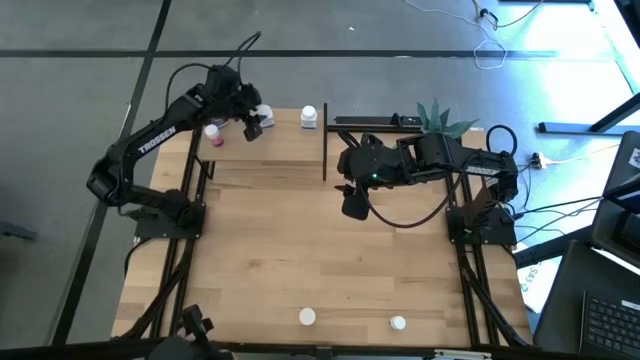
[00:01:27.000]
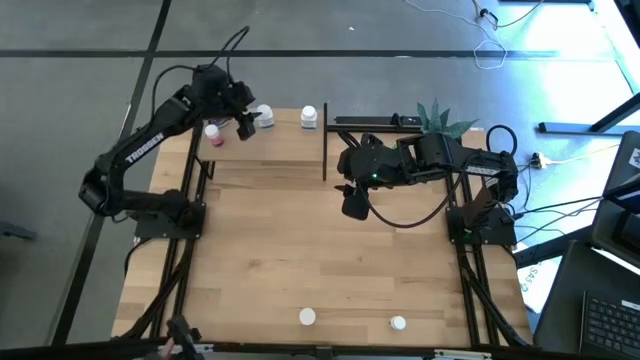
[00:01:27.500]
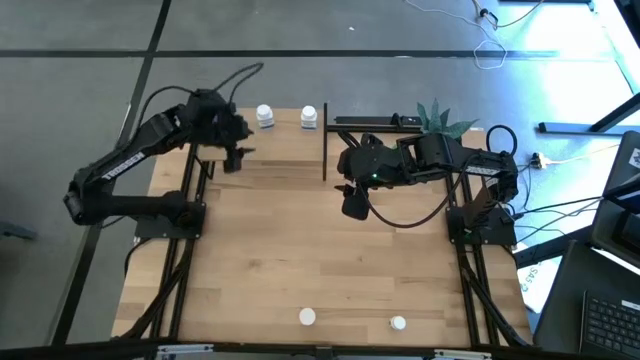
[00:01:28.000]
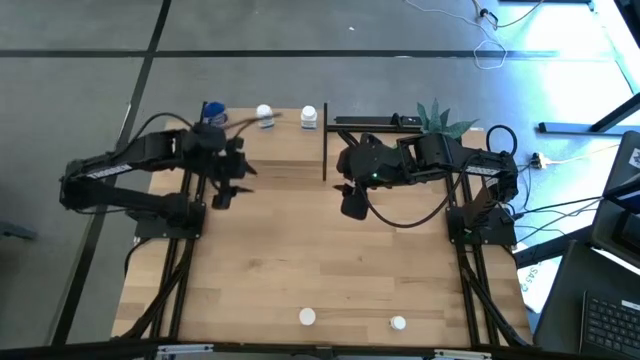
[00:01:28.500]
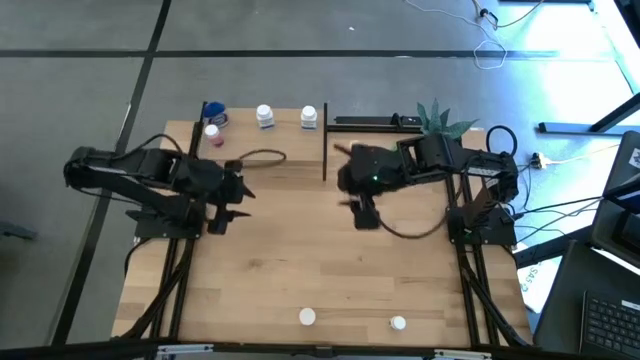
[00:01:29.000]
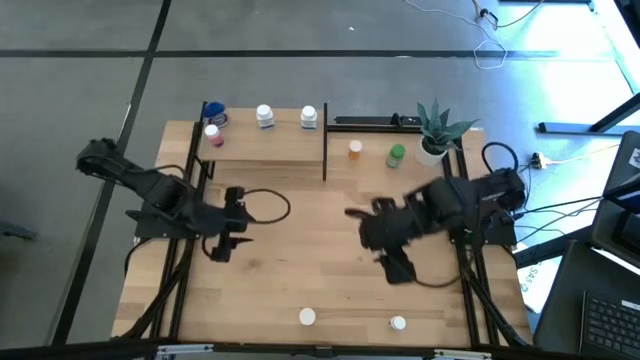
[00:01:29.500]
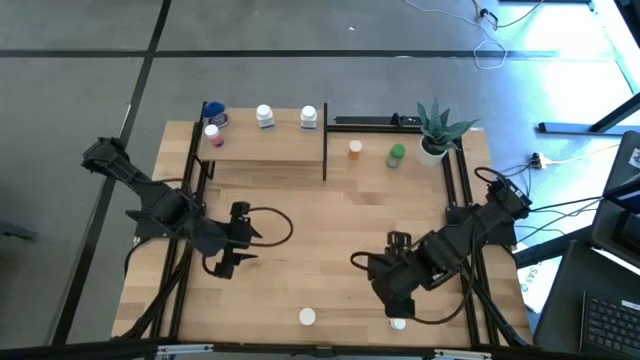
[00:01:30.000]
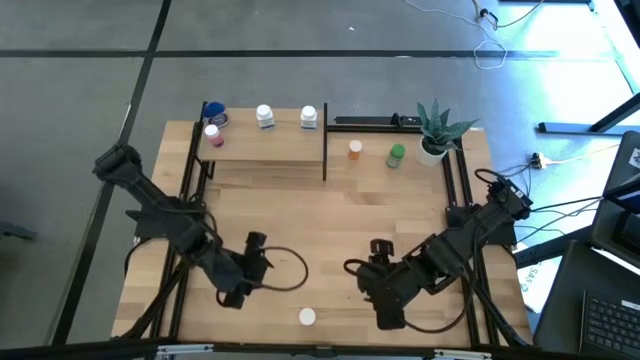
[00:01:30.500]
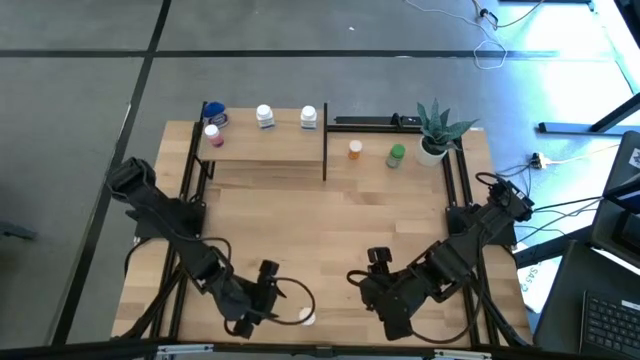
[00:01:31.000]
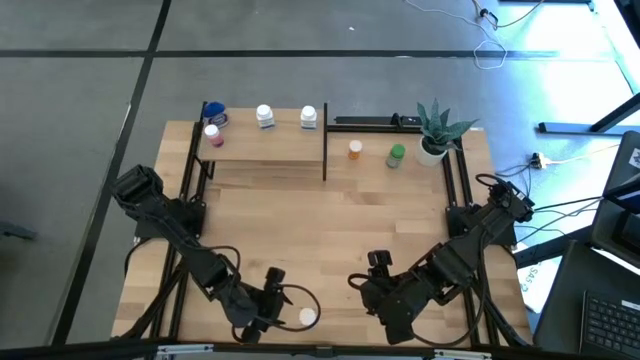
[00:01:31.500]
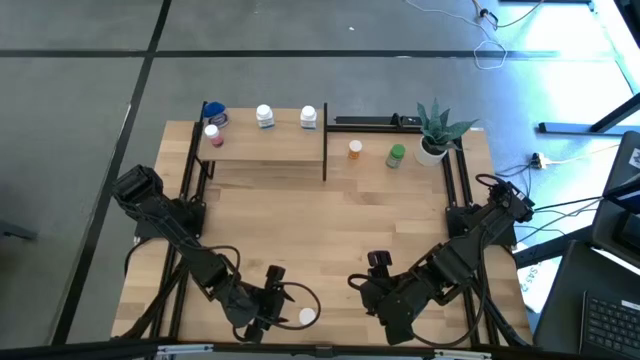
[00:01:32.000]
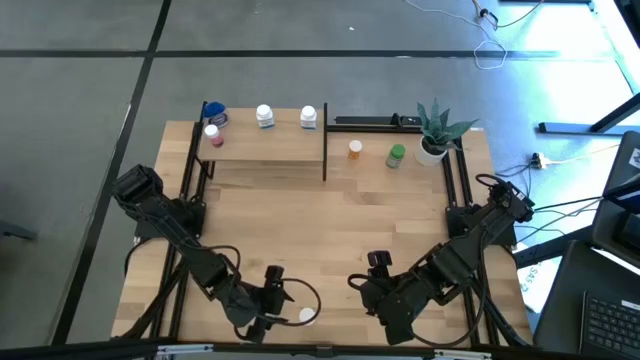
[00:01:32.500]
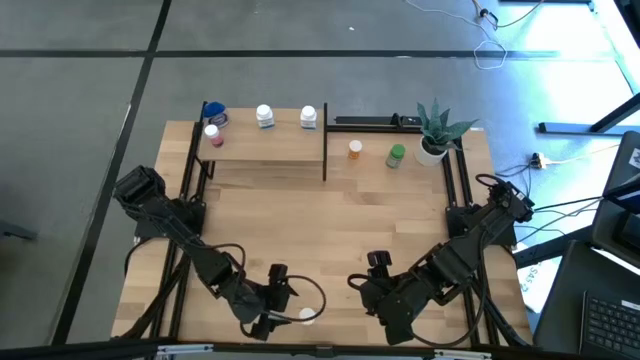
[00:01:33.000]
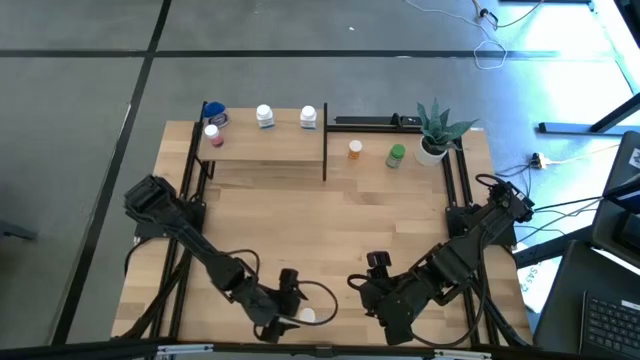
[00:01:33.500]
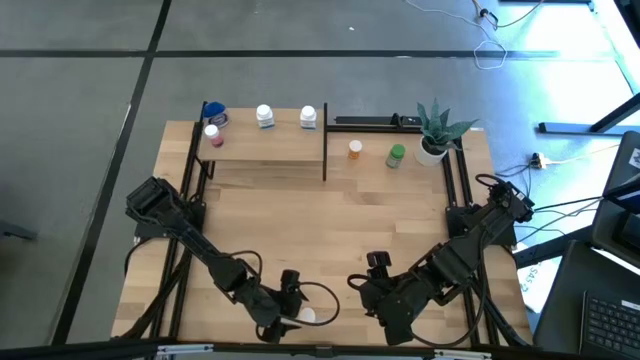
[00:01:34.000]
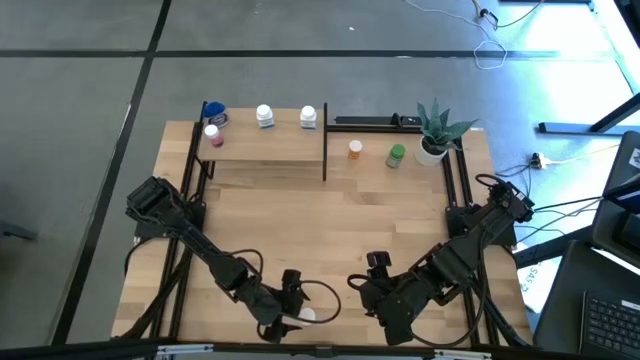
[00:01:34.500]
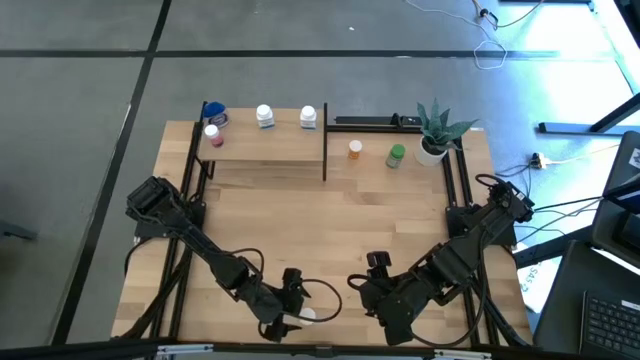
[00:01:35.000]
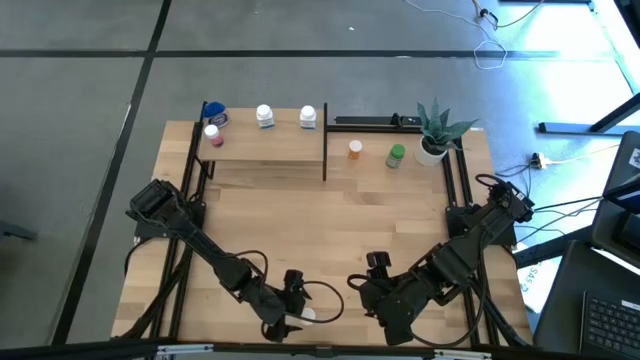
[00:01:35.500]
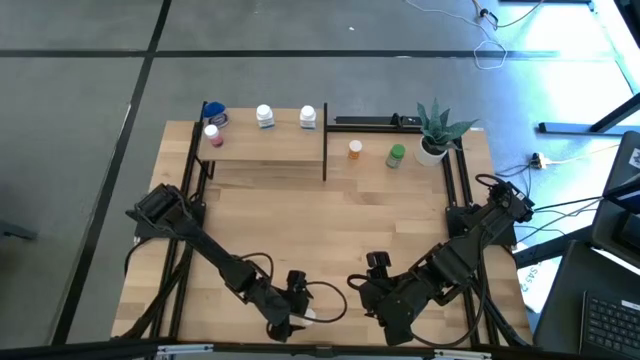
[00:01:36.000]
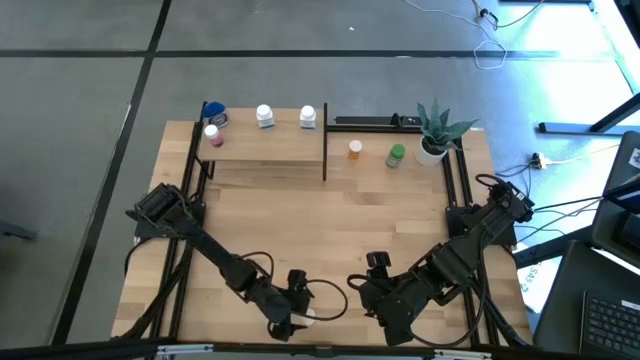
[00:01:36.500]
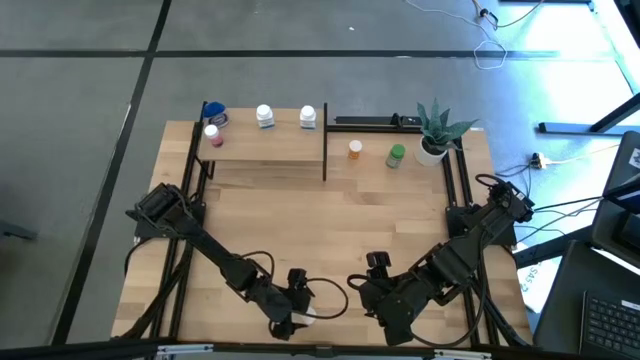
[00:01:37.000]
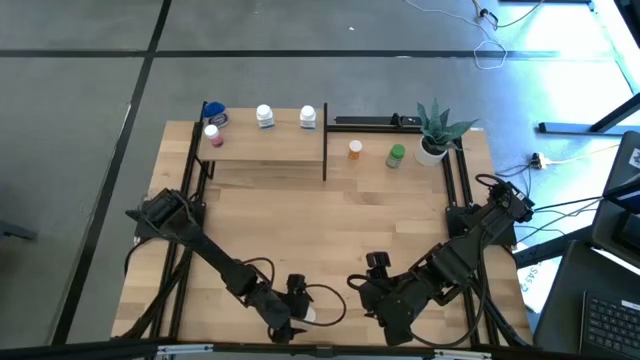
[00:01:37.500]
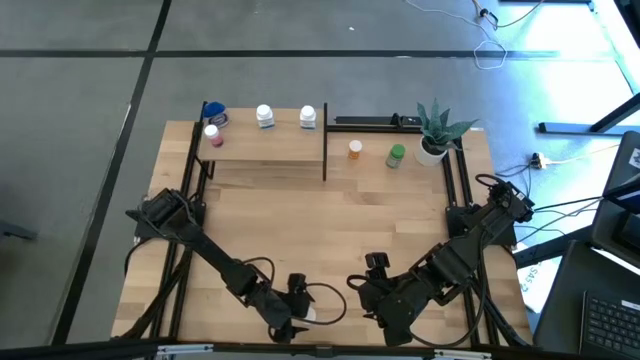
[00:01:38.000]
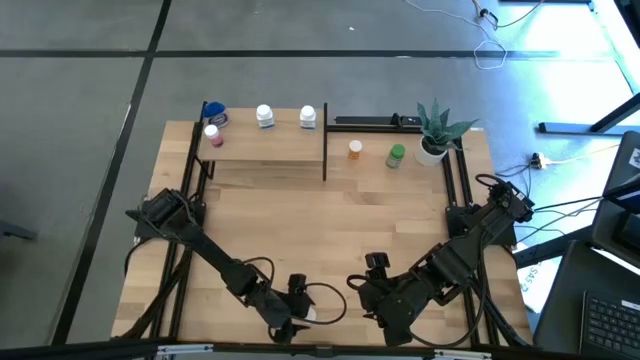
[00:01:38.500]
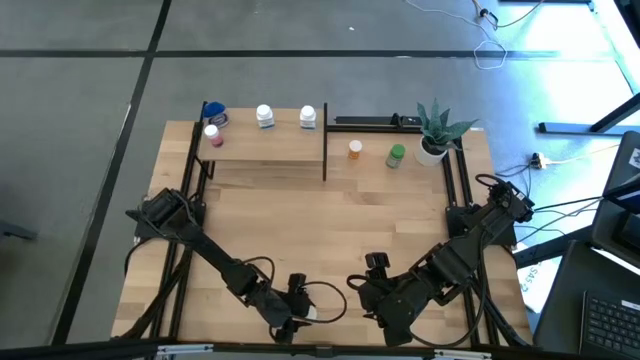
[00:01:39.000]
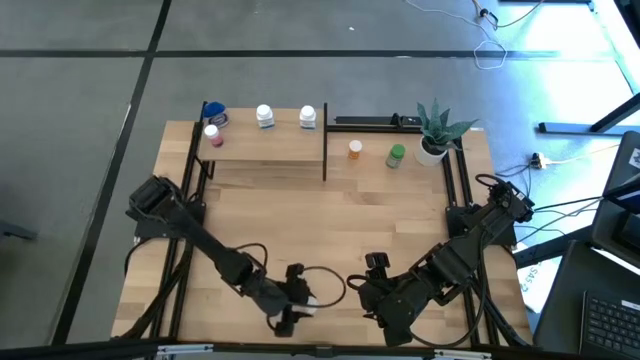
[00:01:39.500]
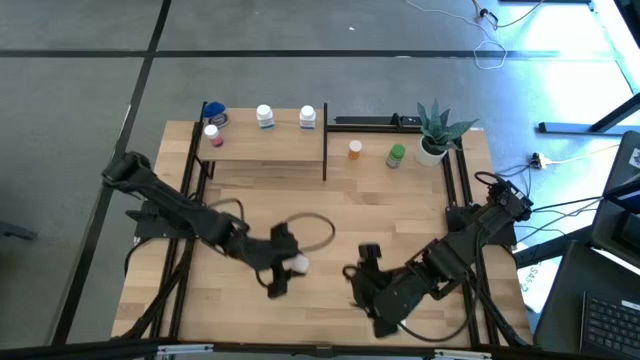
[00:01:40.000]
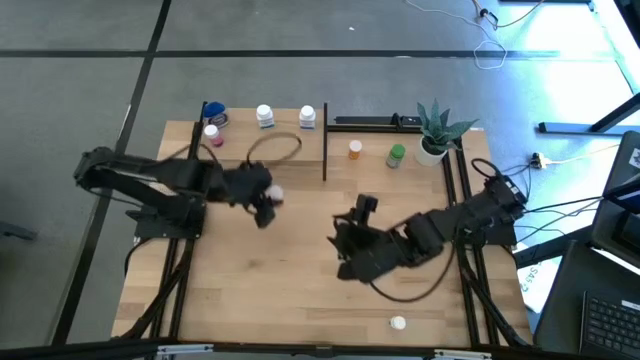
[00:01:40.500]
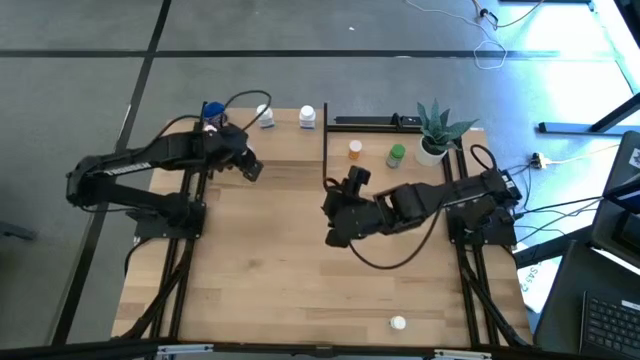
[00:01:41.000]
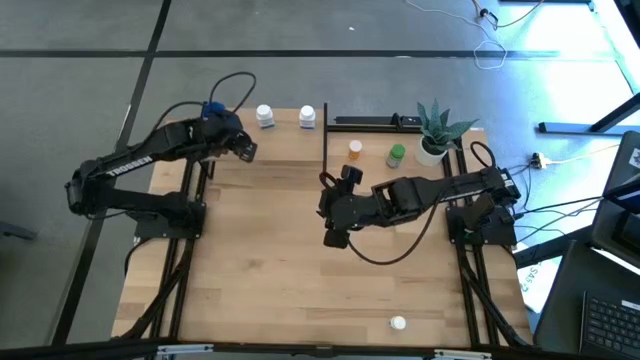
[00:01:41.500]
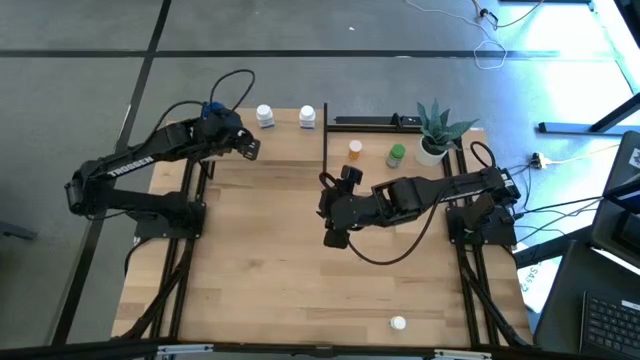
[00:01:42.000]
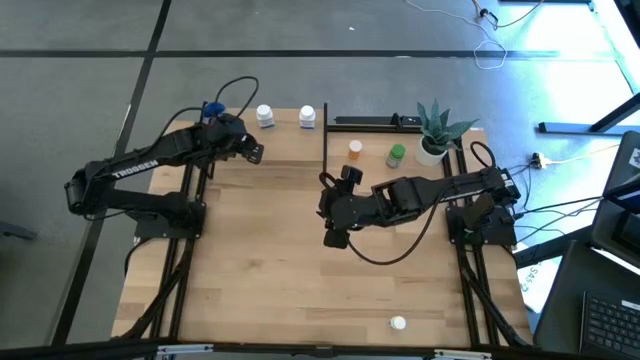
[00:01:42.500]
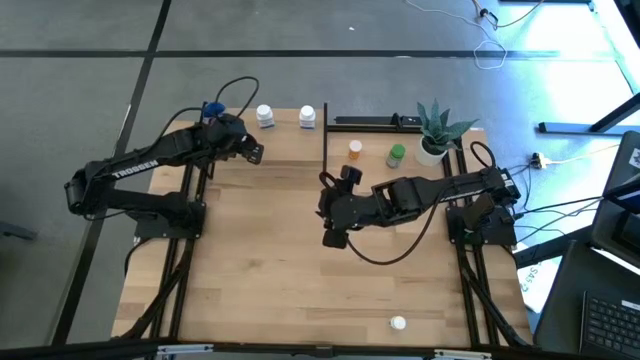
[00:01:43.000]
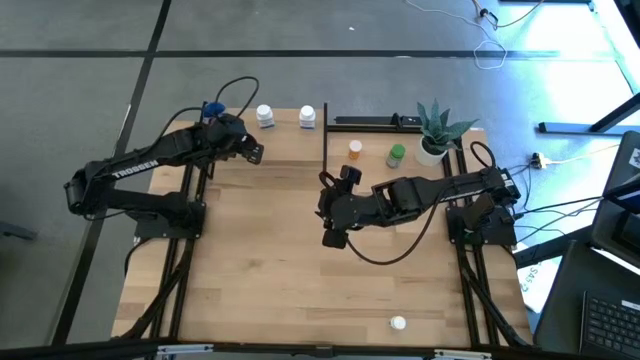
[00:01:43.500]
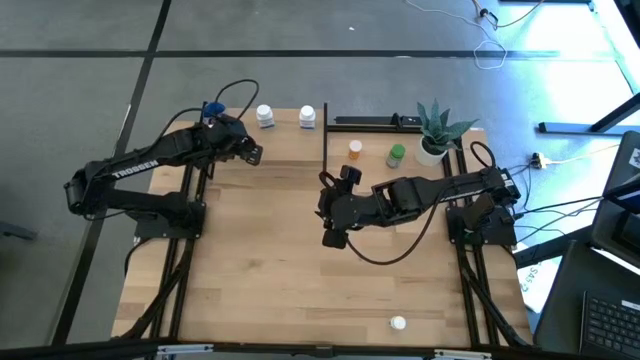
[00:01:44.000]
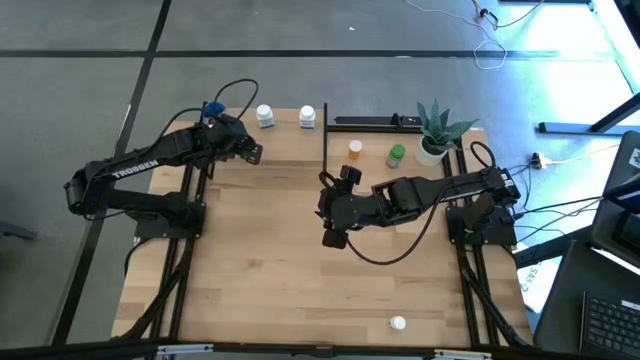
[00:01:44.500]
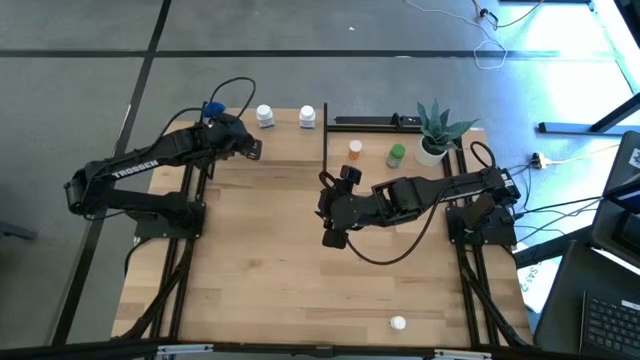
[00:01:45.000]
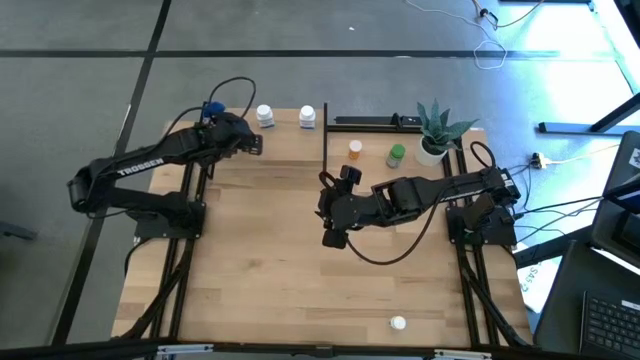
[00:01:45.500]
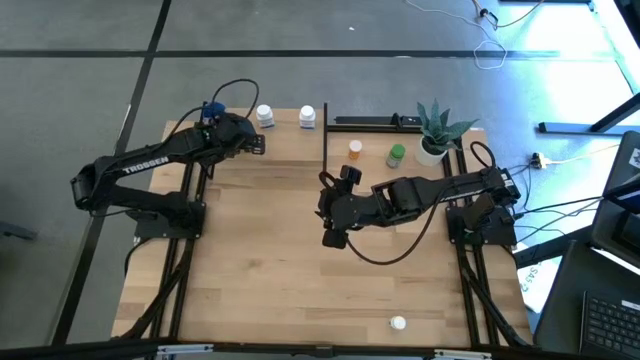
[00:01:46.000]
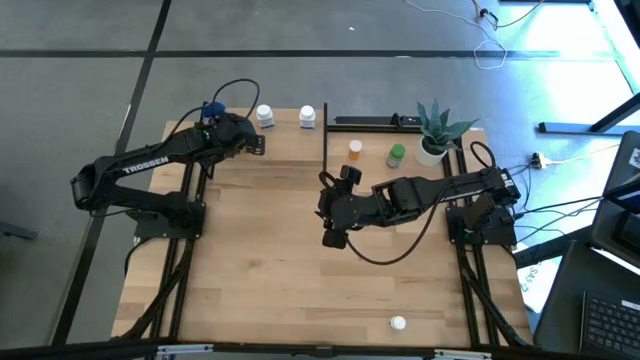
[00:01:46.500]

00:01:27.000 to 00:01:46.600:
Task: Pick and place medicine bottles onto shelf by color
Put the bottom orange pill bottle on the shelf

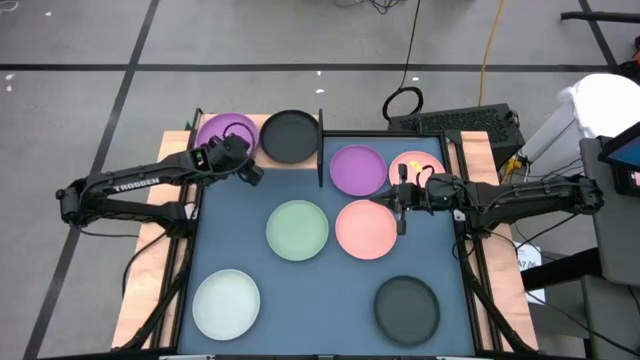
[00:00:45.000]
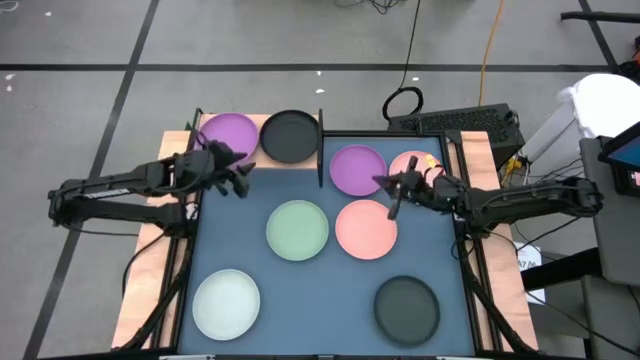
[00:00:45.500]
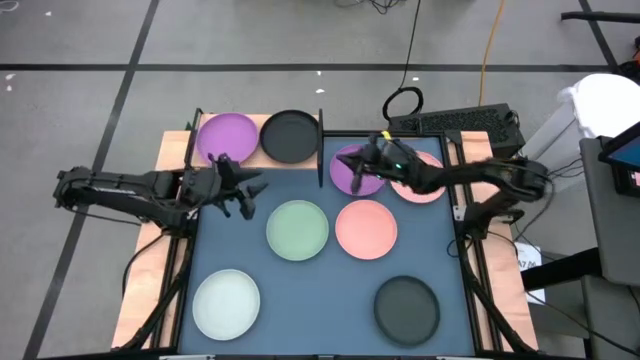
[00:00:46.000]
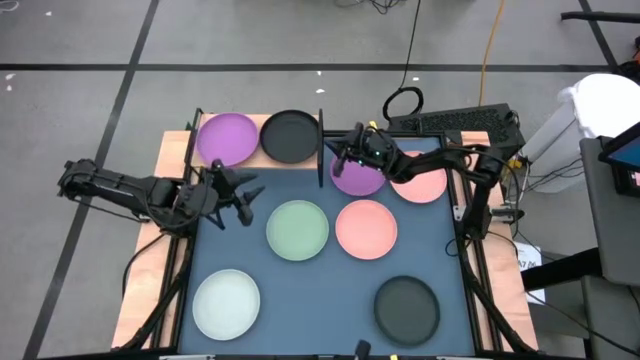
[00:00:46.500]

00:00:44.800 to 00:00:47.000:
Task: Place and stack plates onto a shelf
Adjust the black plate on the shelf
